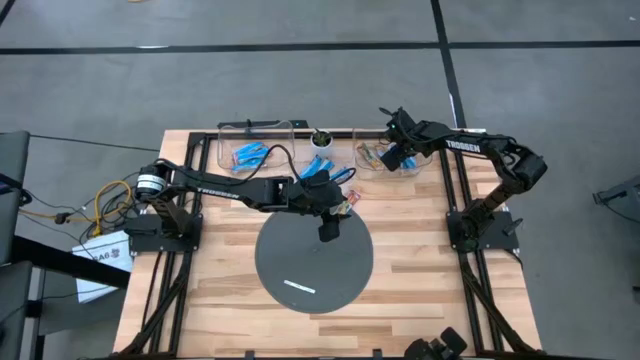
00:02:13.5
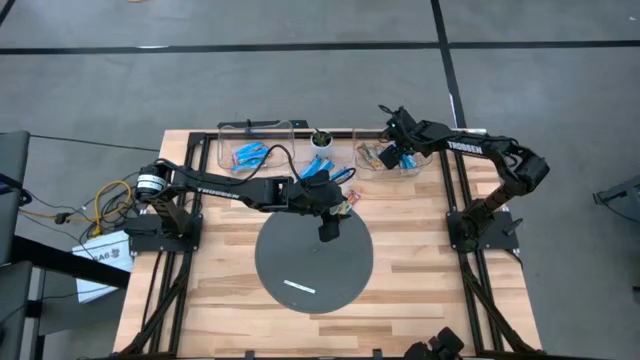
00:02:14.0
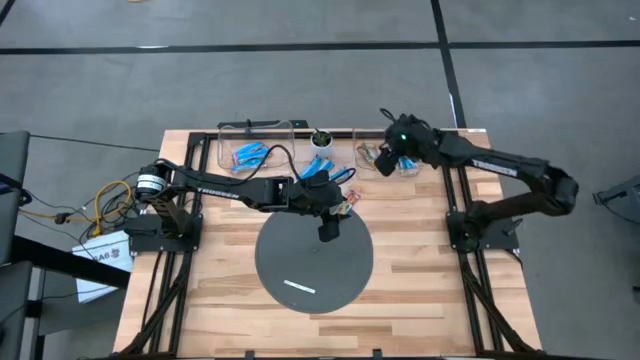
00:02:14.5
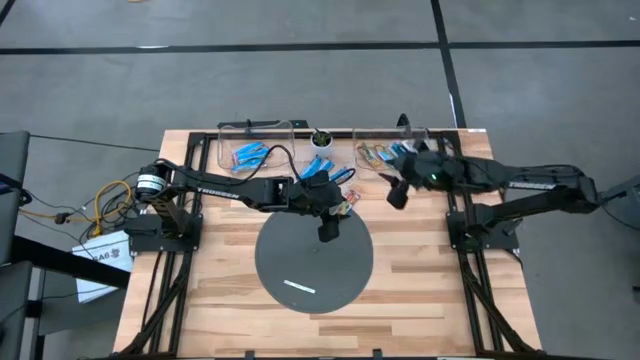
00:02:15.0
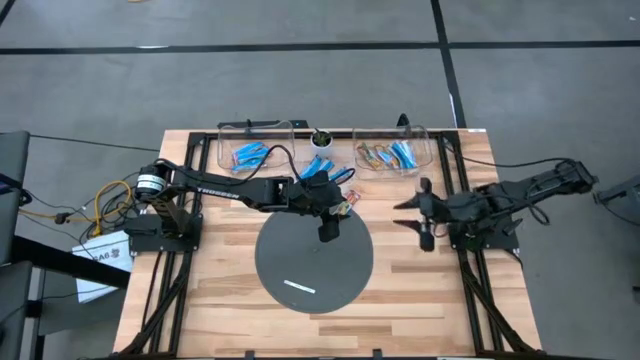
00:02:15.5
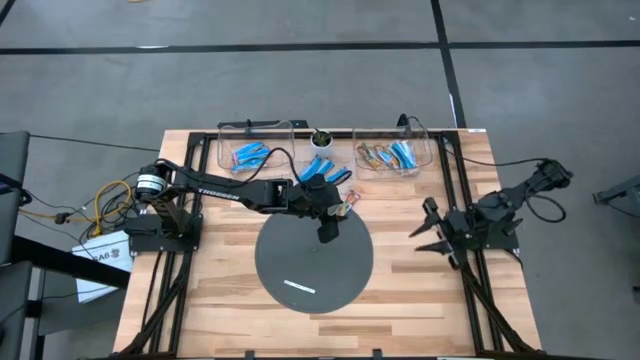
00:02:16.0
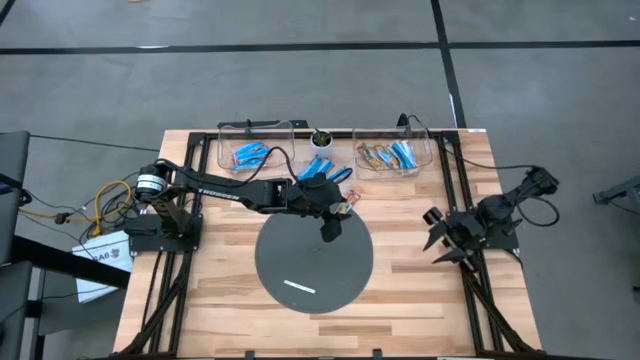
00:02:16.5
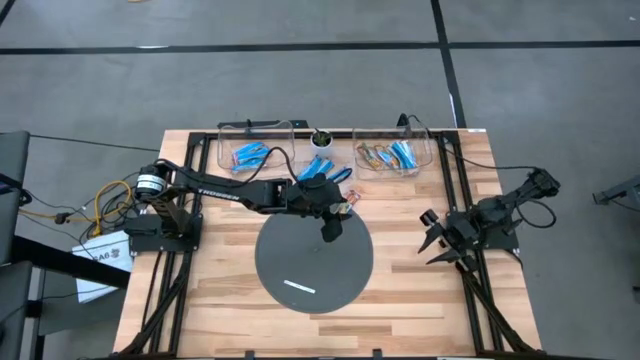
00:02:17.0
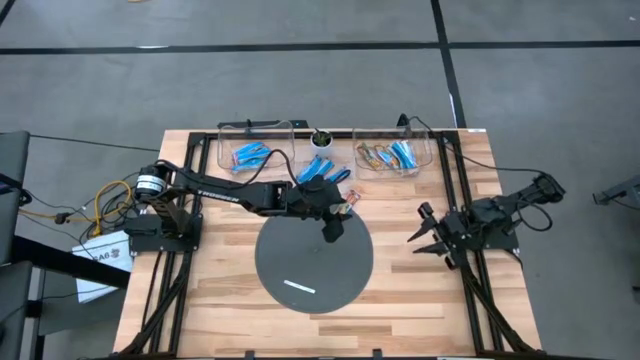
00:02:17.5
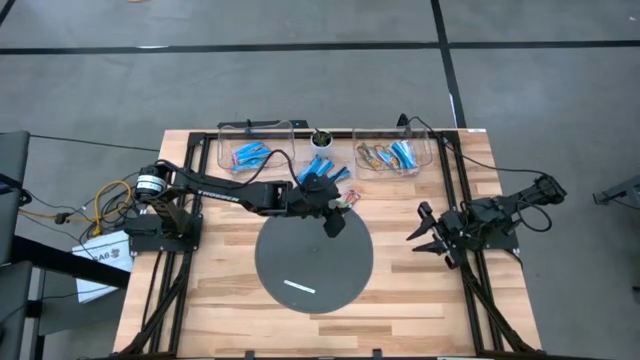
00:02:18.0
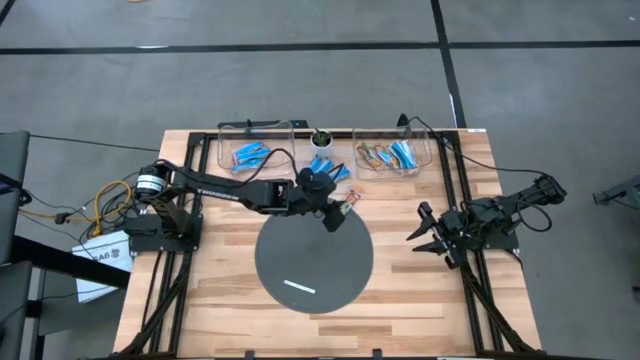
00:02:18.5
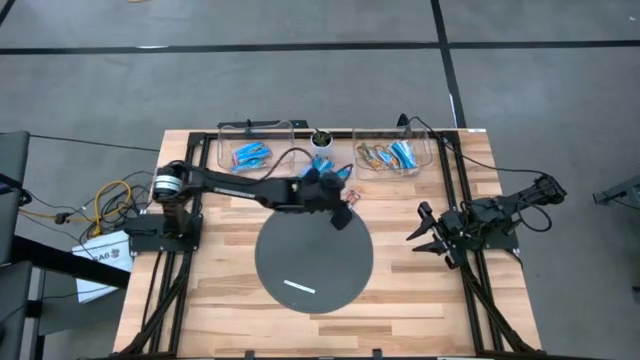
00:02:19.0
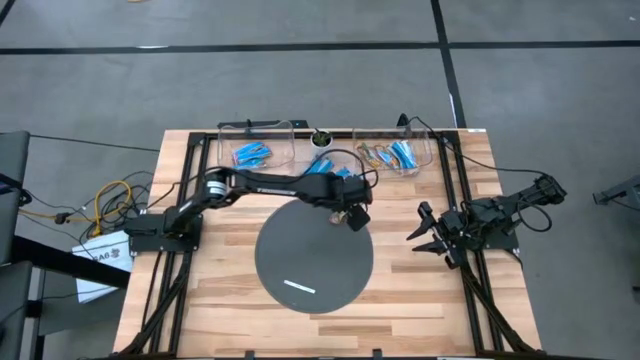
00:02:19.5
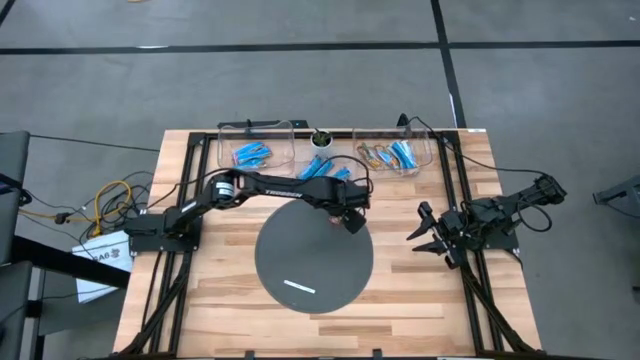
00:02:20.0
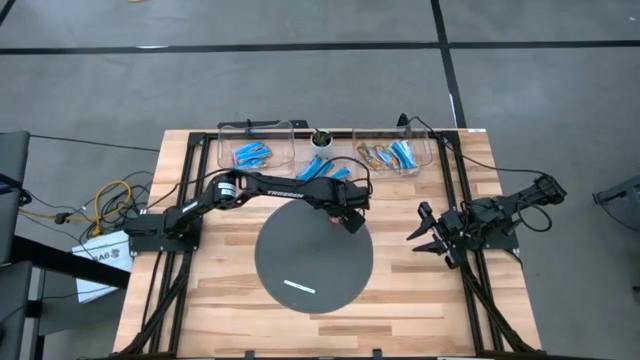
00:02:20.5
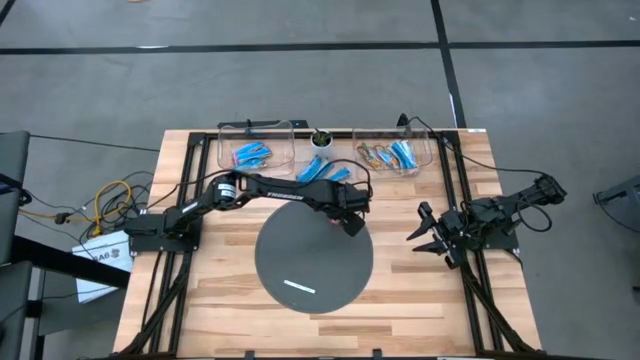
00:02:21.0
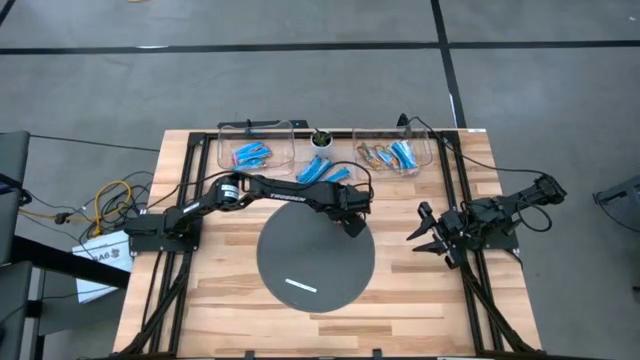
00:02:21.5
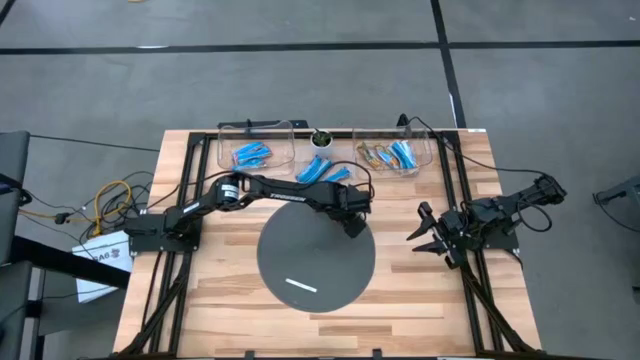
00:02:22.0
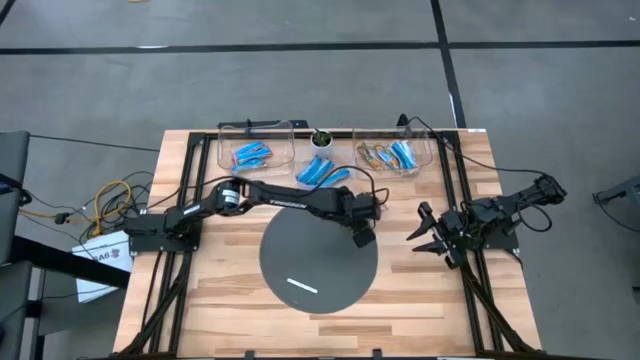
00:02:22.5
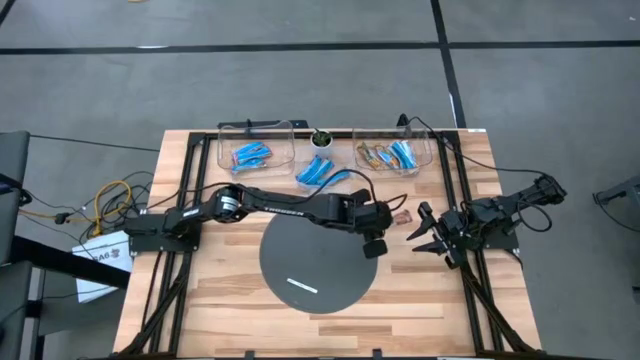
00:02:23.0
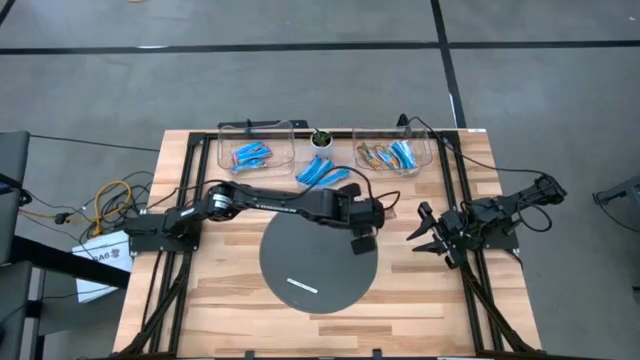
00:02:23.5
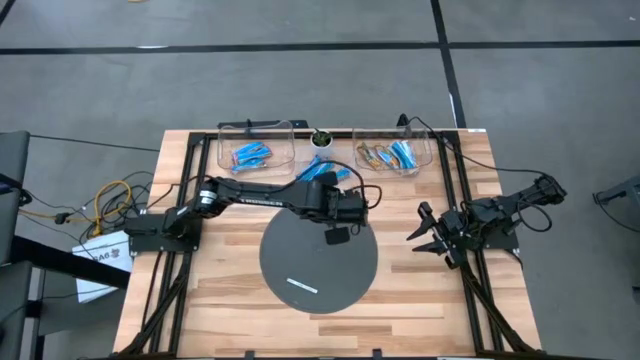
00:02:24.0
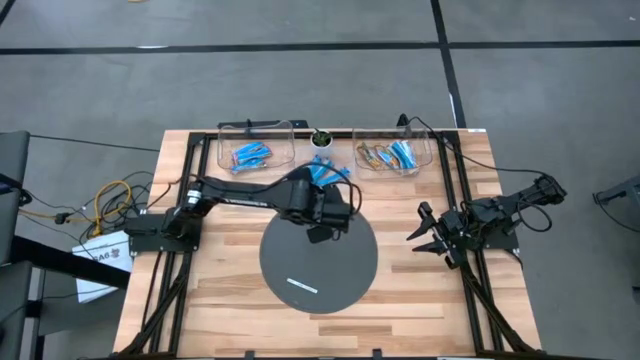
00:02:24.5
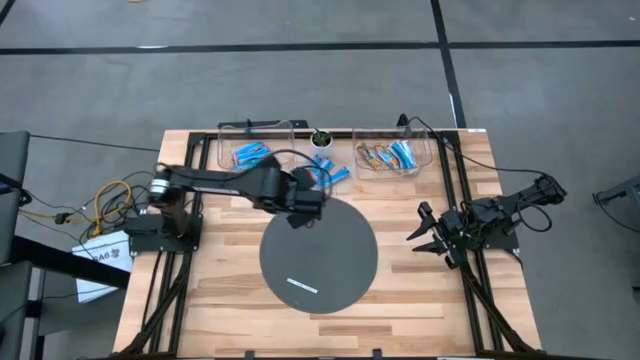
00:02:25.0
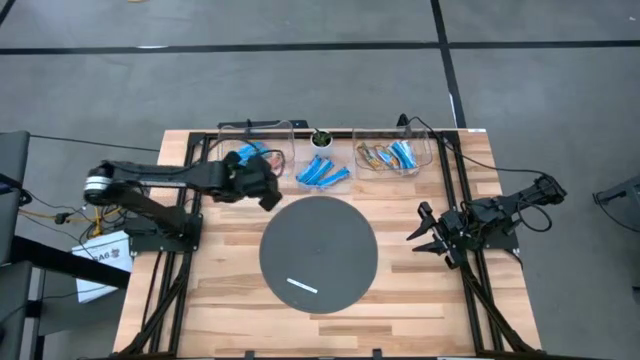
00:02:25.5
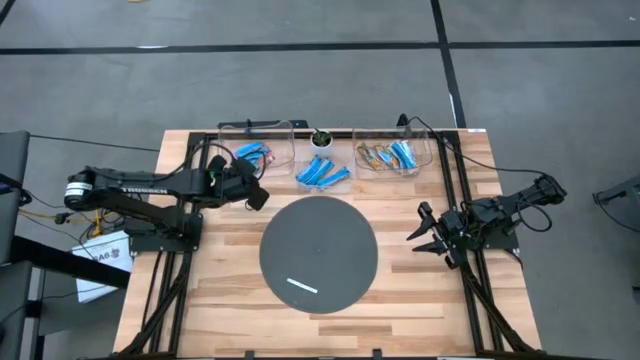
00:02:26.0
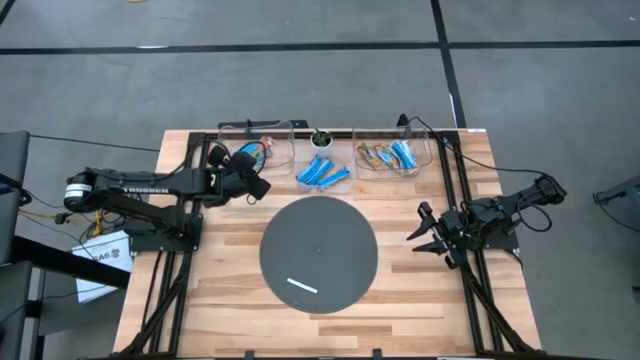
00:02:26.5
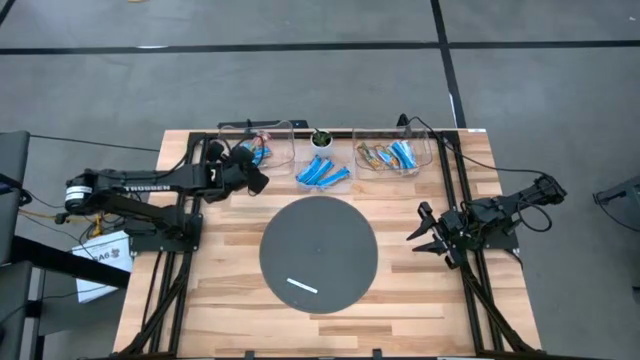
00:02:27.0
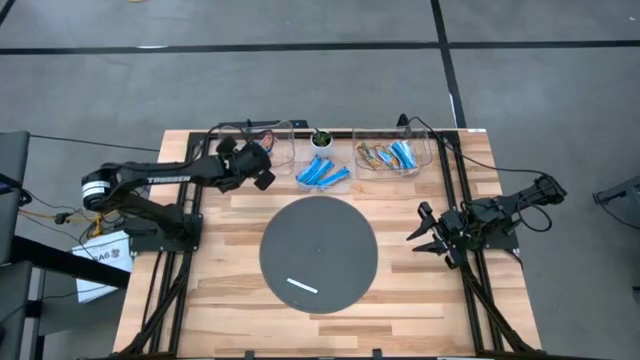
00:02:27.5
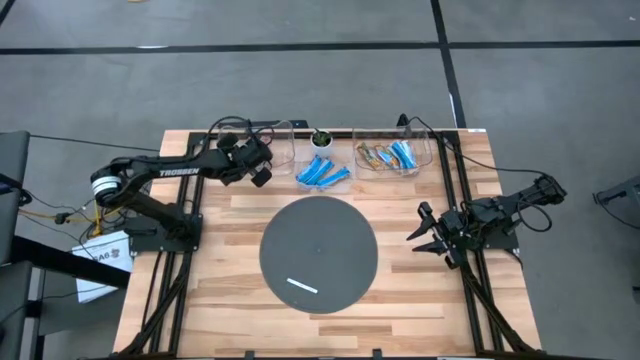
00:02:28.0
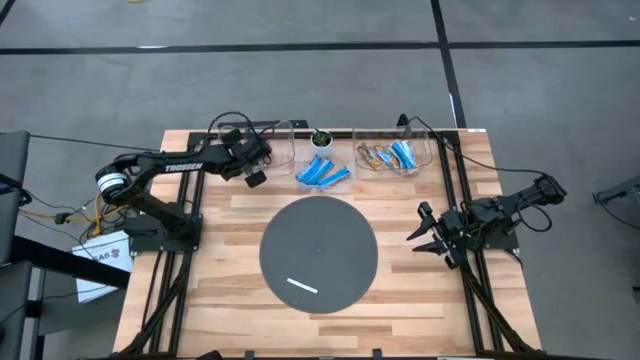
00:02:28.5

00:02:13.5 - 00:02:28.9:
Task: Pick and place Granola Bars by type
Put the red granola bar into the left transparent bin

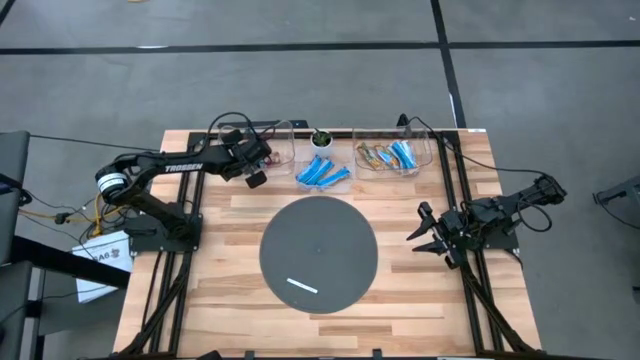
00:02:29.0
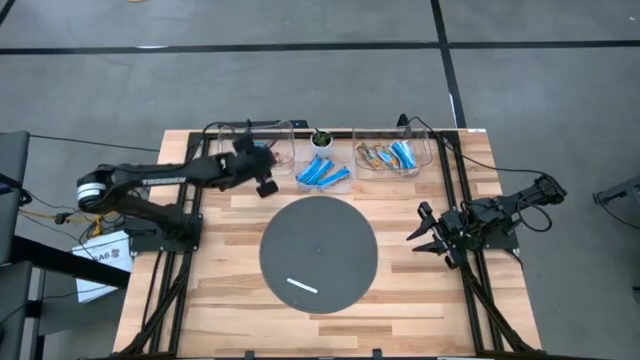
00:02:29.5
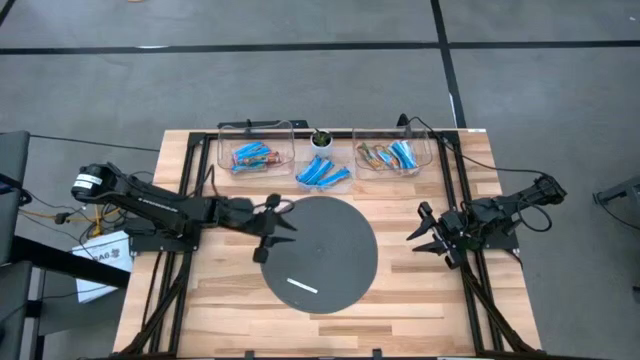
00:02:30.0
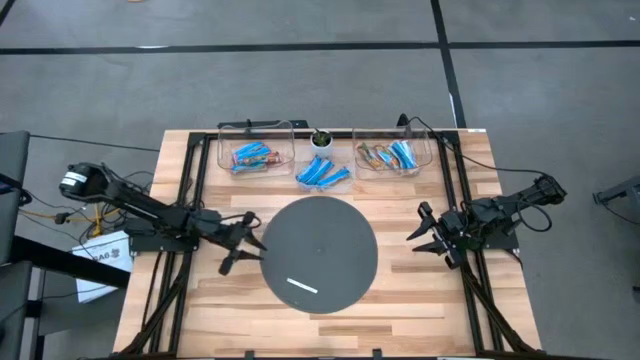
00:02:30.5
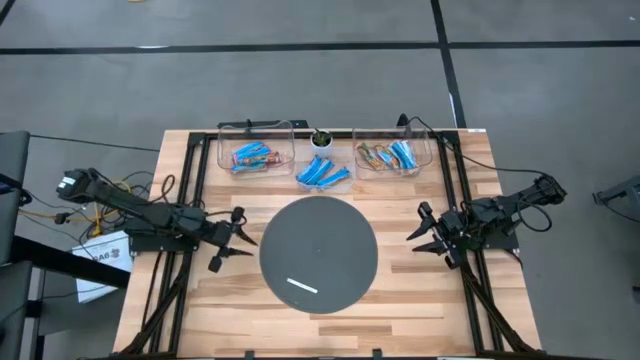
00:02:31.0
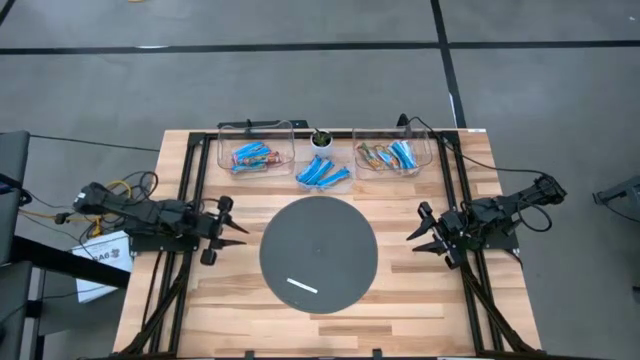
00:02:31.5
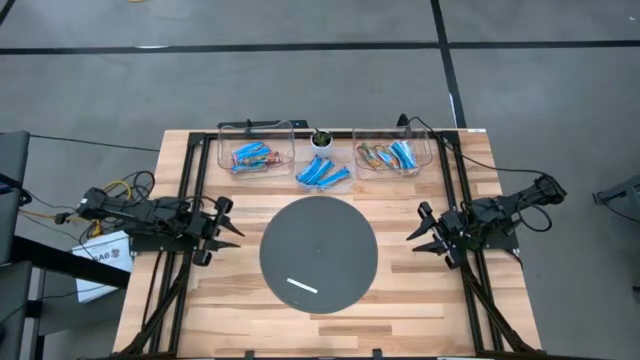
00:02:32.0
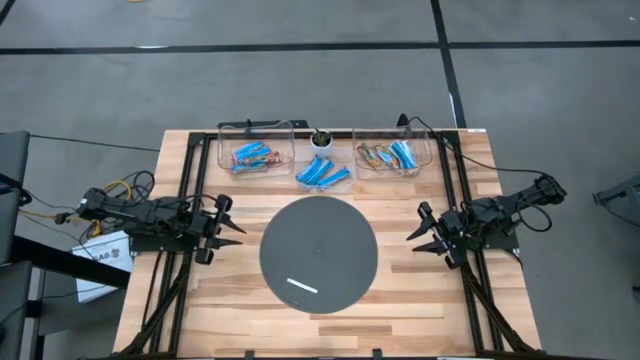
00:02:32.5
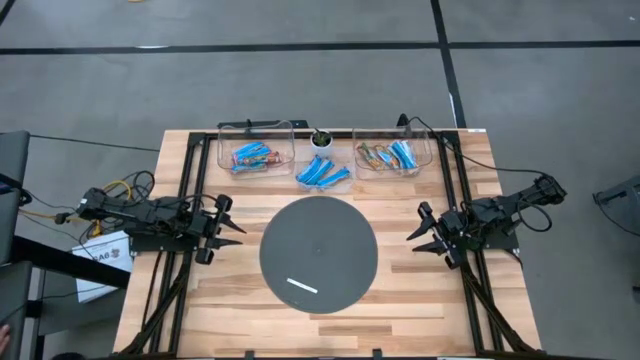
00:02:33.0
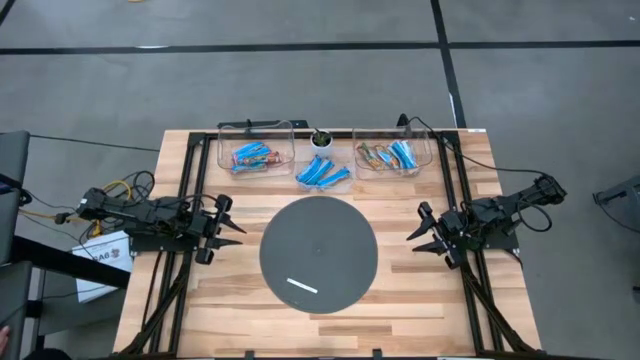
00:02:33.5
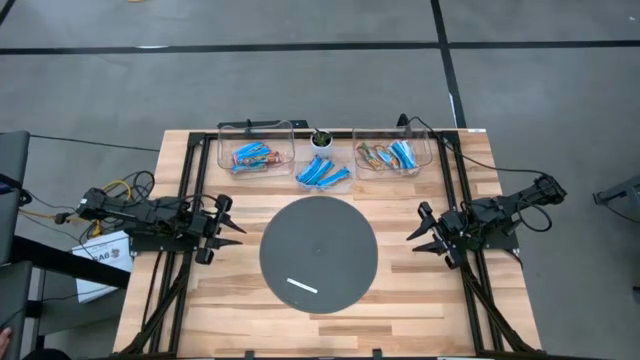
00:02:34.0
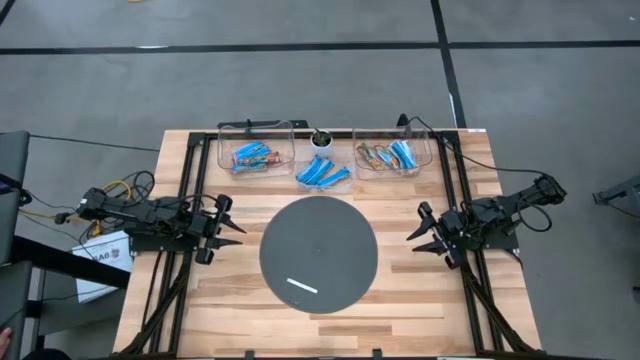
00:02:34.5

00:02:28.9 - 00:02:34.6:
Return to Home Position
